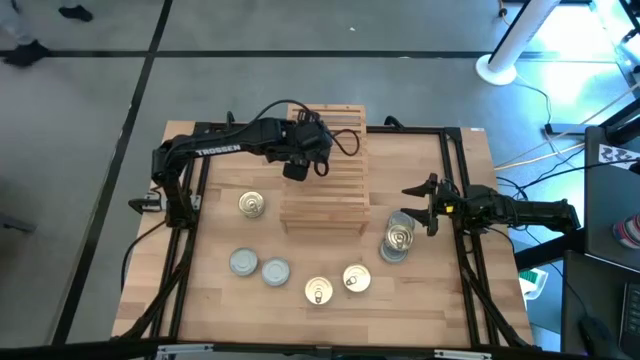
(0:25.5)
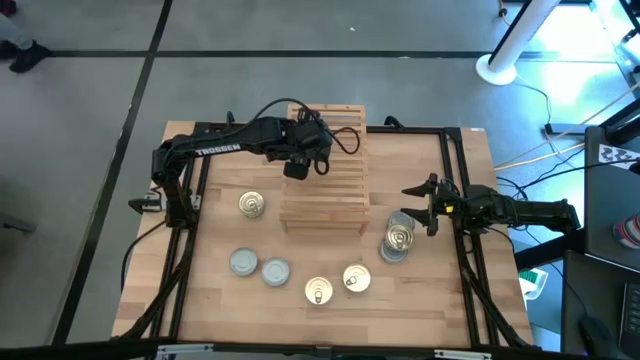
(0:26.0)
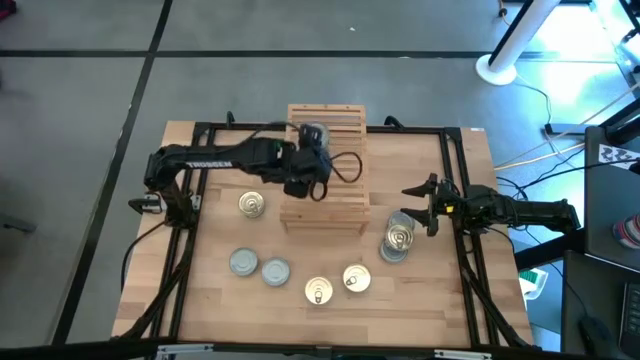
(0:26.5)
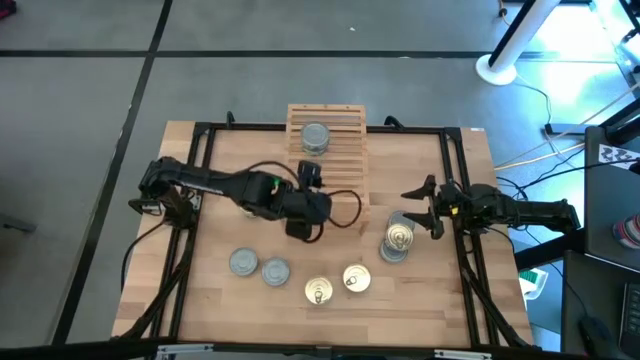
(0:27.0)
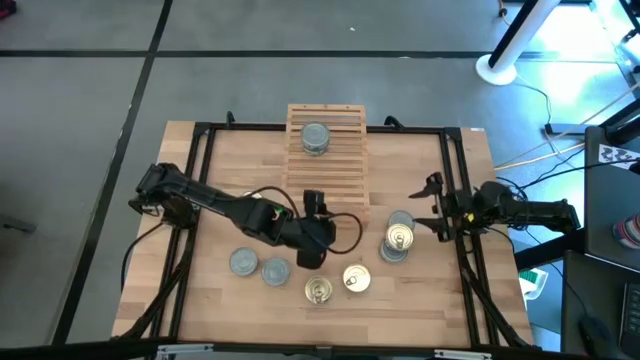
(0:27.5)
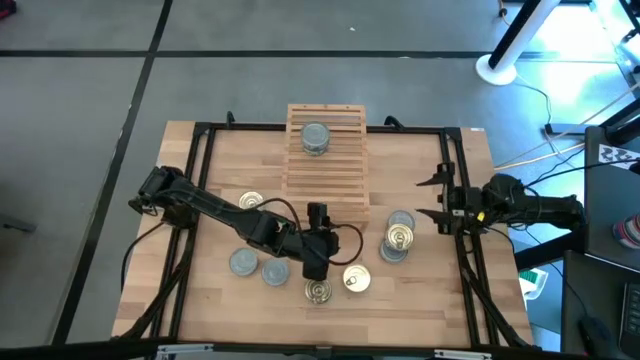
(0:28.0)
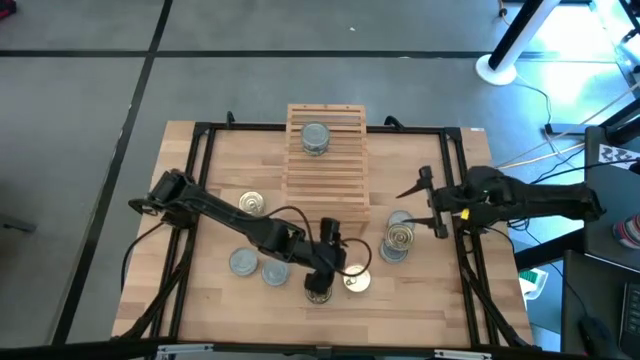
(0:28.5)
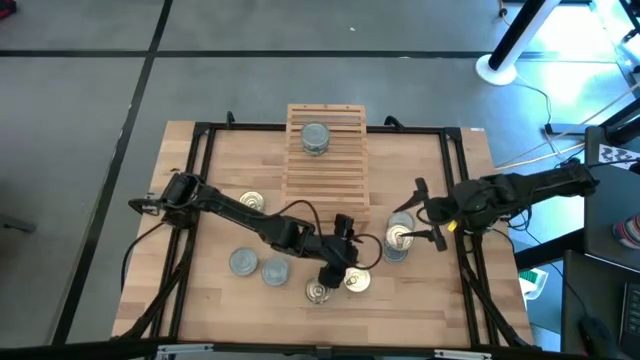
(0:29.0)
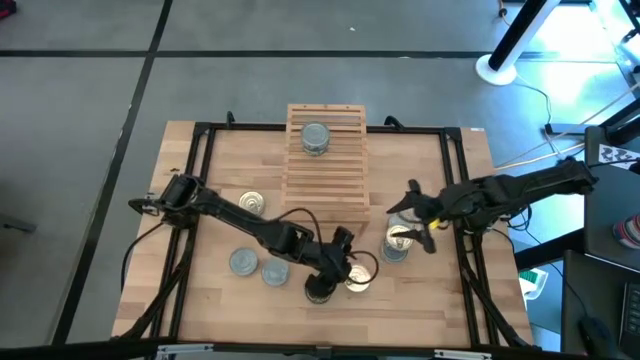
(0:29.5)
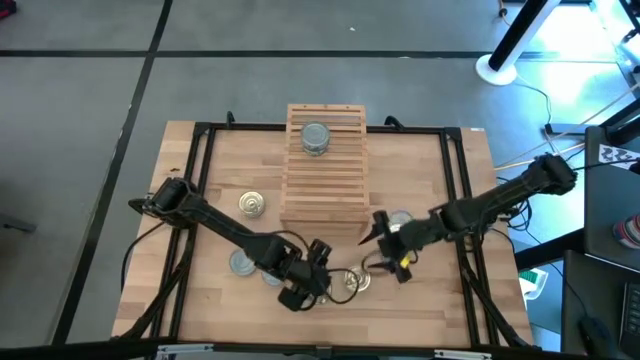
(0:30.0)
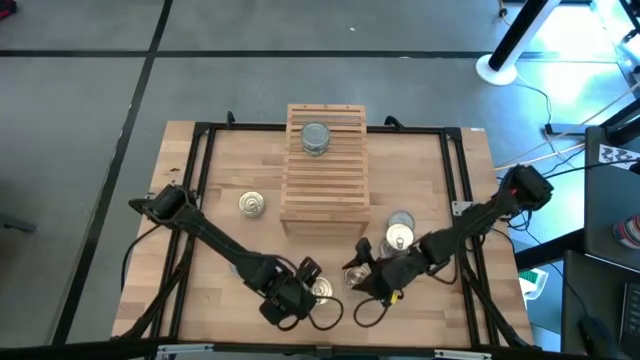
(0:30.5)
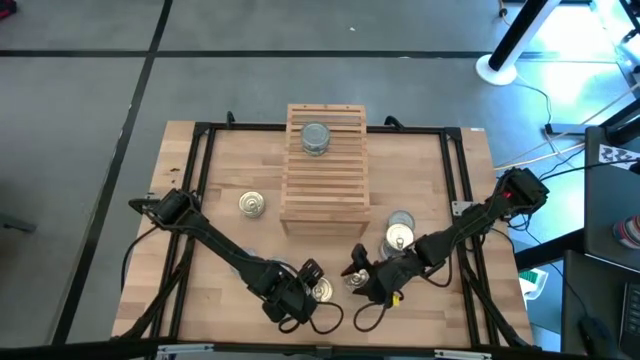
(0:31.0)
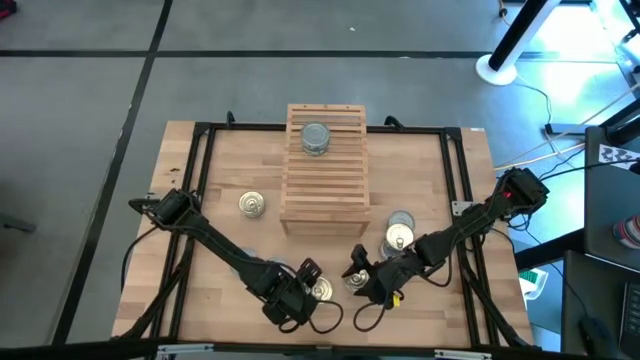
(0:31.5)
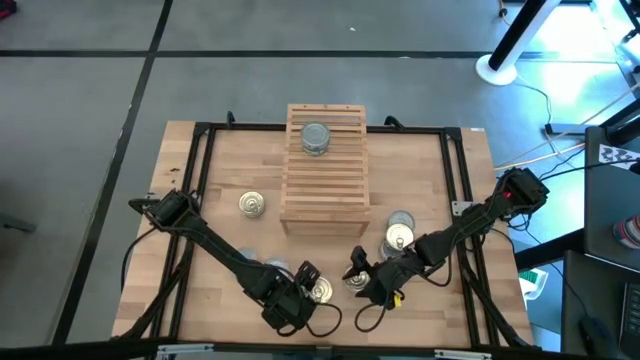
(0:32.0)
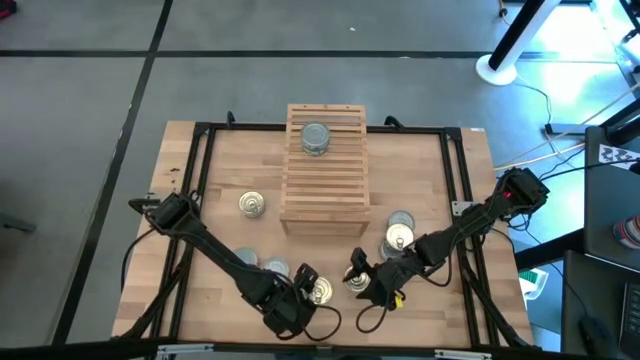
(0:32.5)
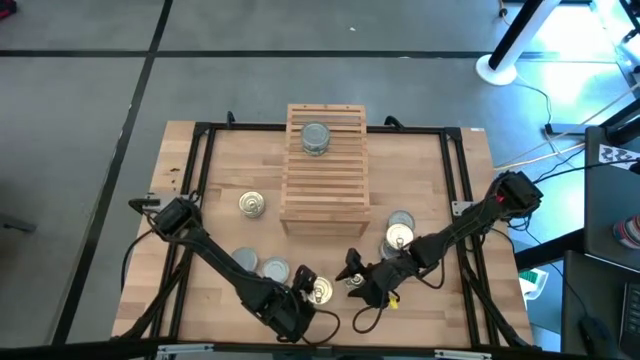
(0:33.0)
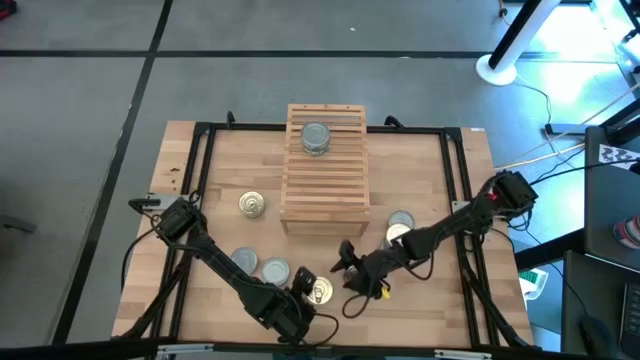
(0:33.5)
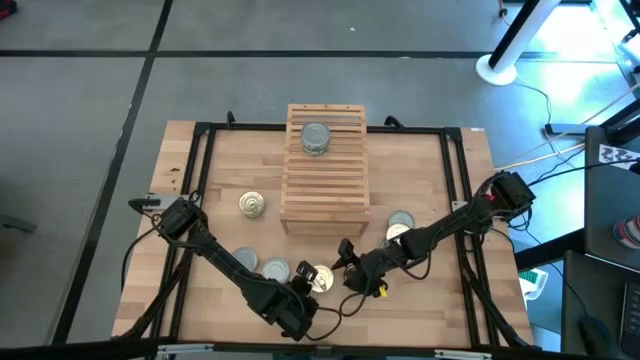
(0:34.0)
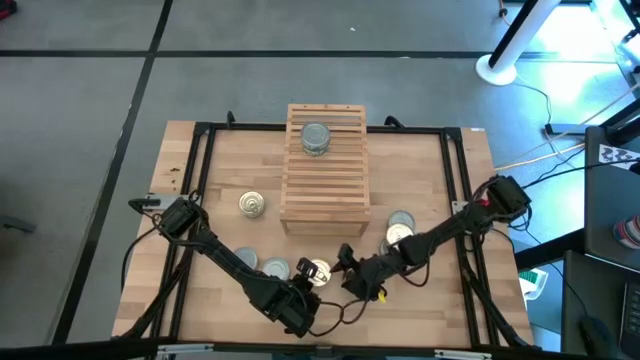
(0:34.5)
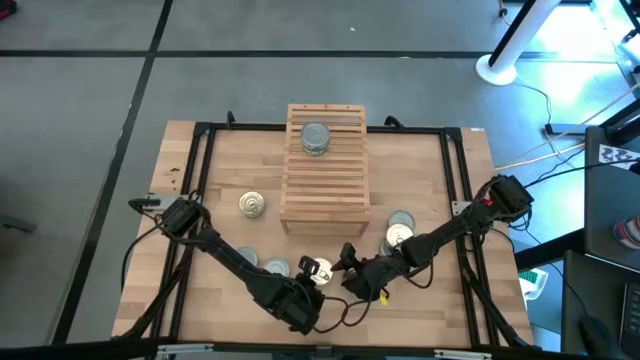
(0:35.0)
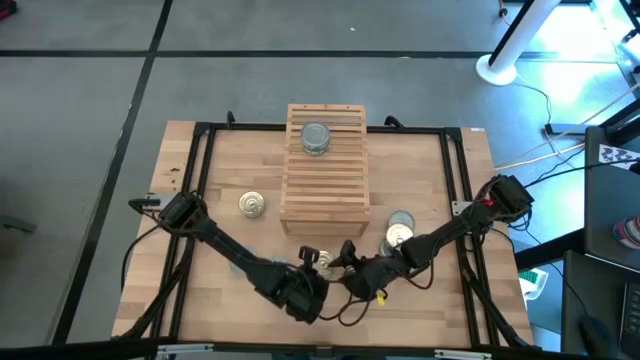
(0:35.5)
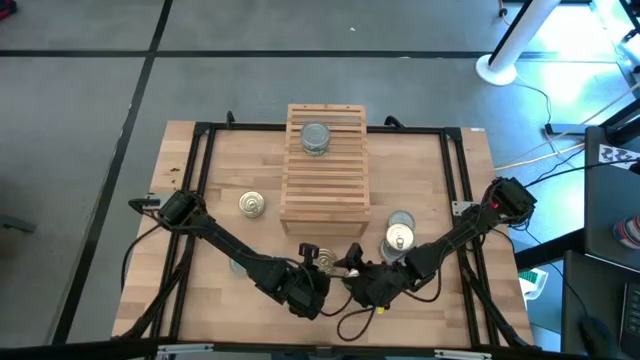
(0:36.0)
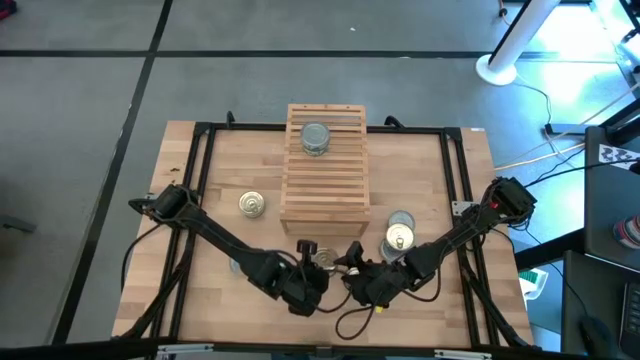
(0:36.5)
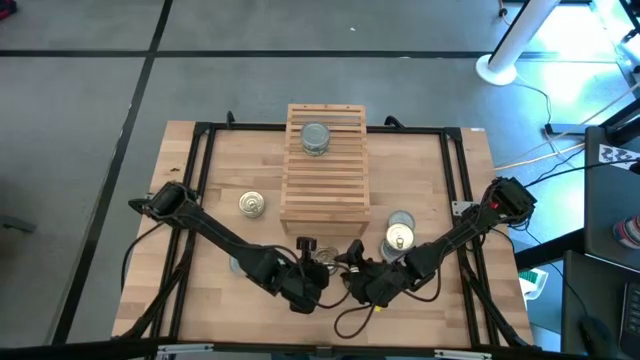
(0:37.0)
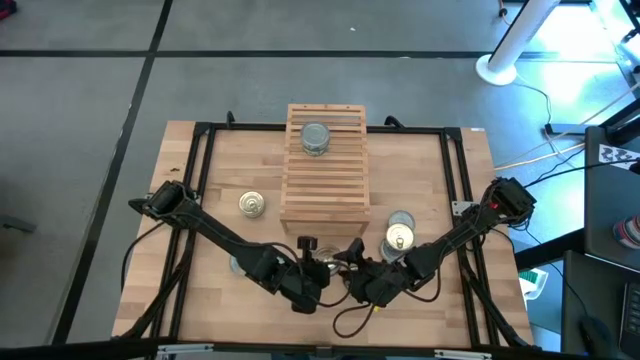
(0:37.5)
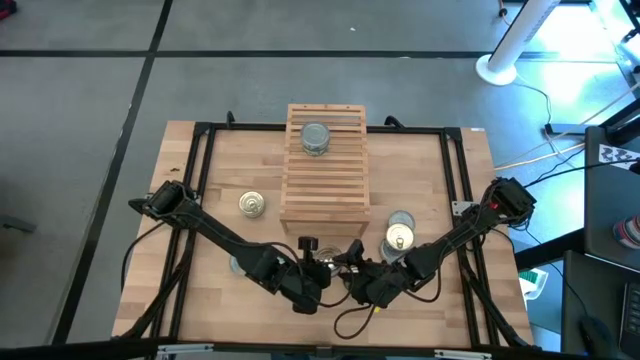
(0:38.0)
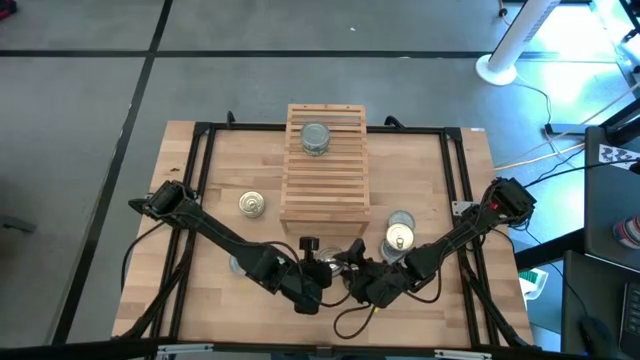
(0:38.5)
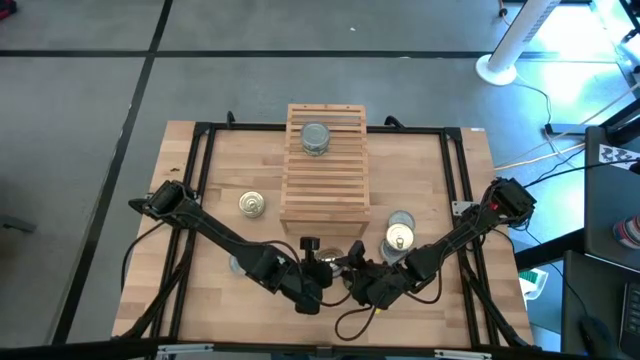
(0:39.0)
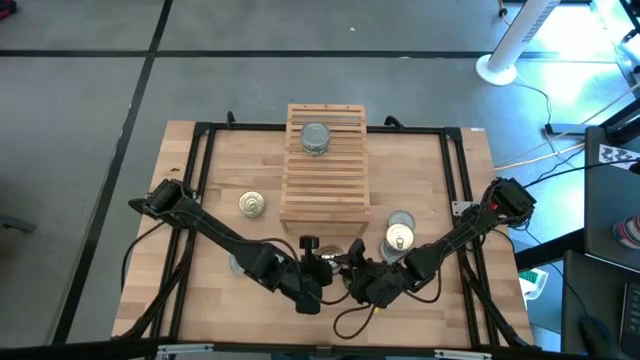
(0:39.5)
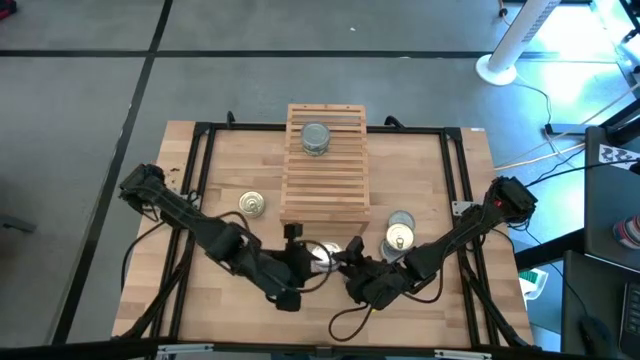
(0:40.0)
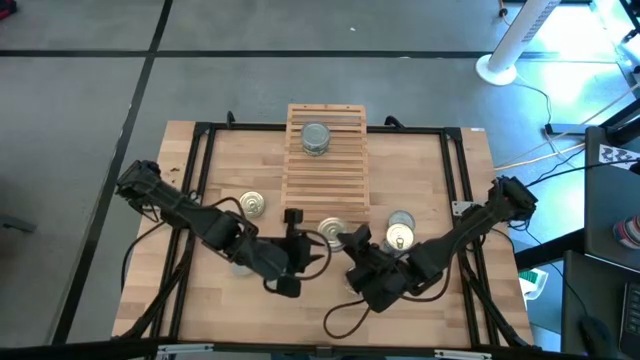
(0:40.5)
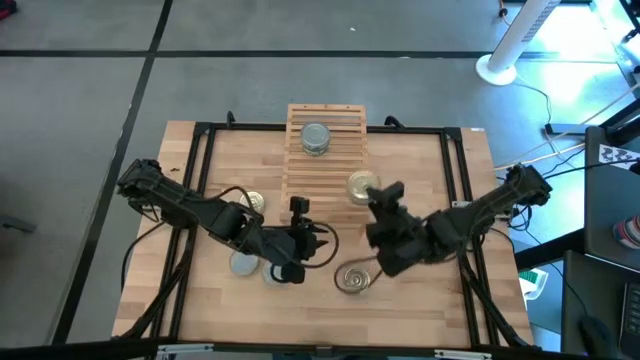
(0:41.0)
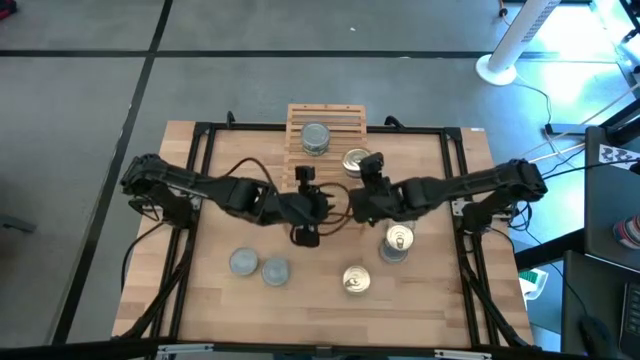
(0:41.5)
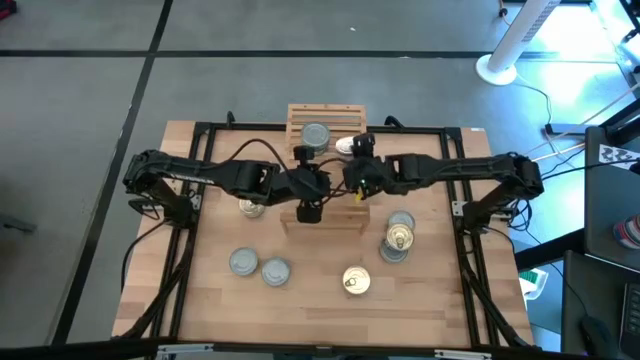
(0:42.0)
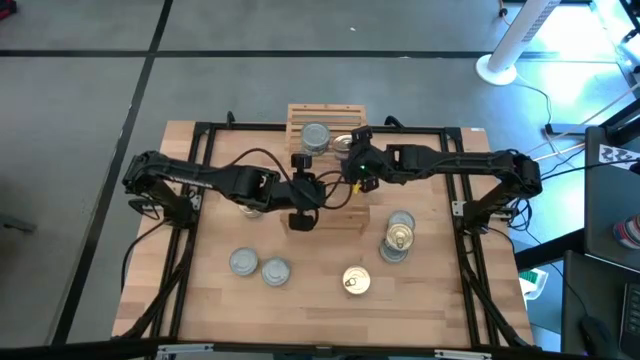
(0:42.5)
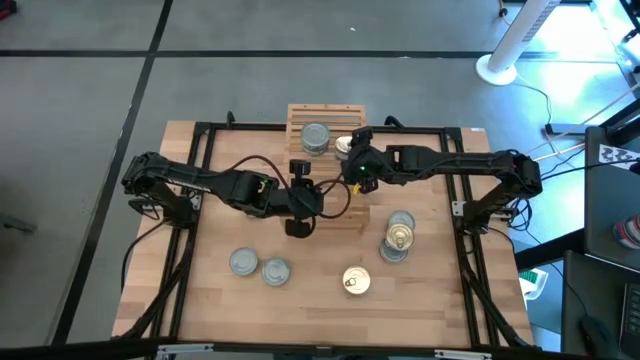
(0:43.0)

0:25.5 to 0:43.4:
Task: Stack canned seafood by type on shelf
Put the blue tuna can on the shelf

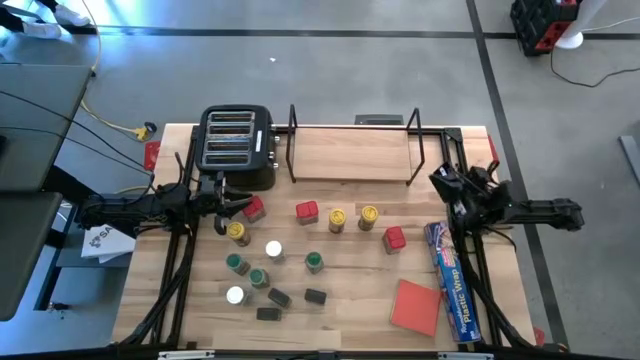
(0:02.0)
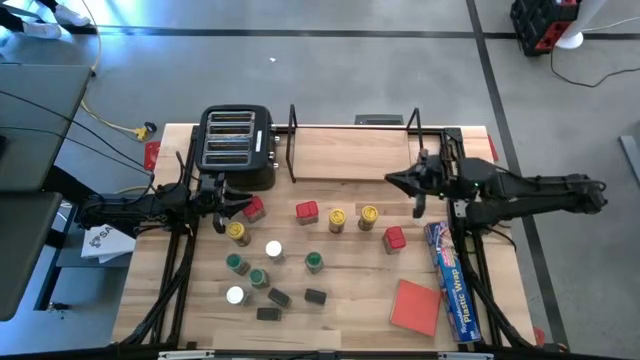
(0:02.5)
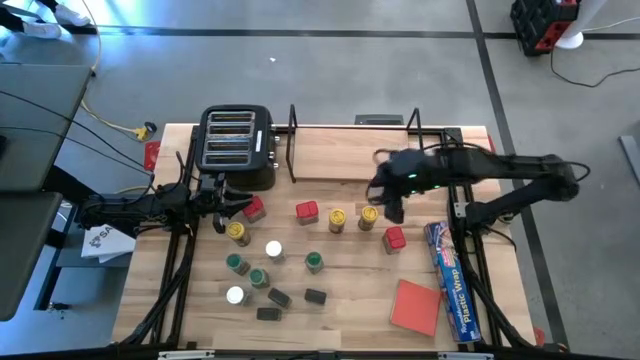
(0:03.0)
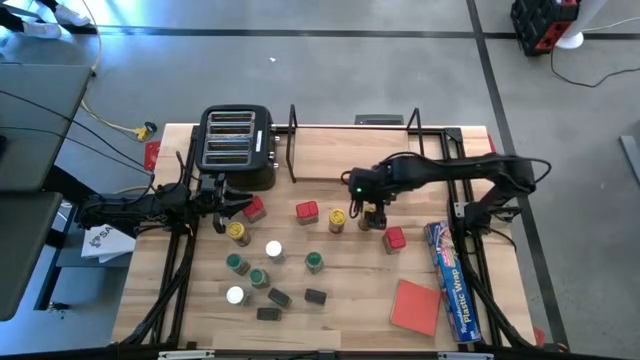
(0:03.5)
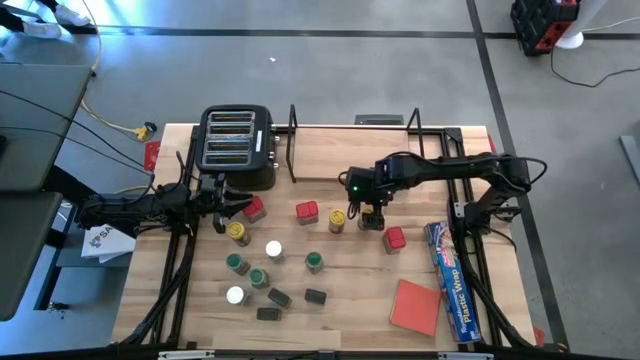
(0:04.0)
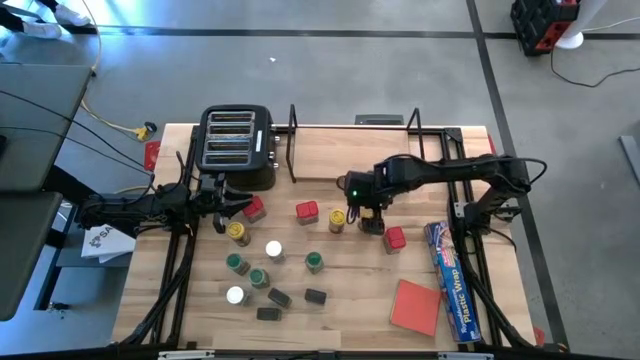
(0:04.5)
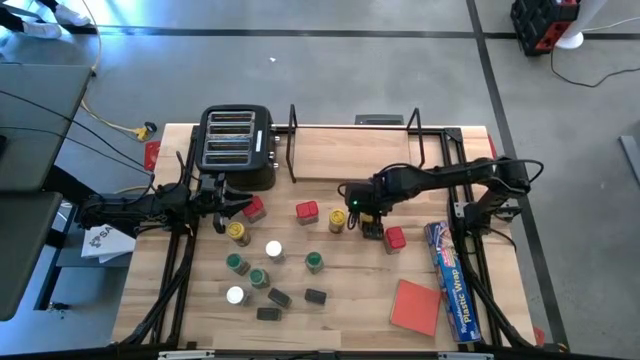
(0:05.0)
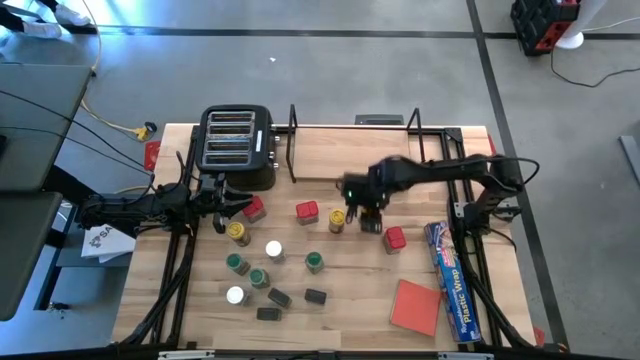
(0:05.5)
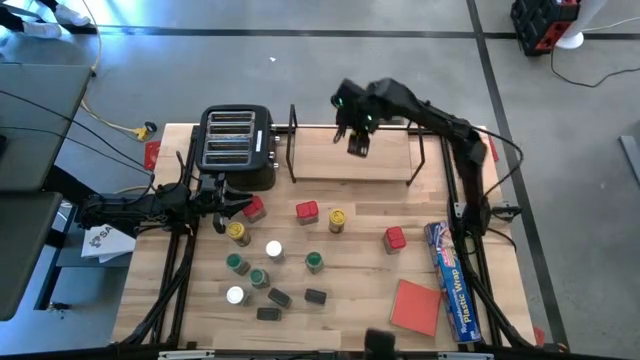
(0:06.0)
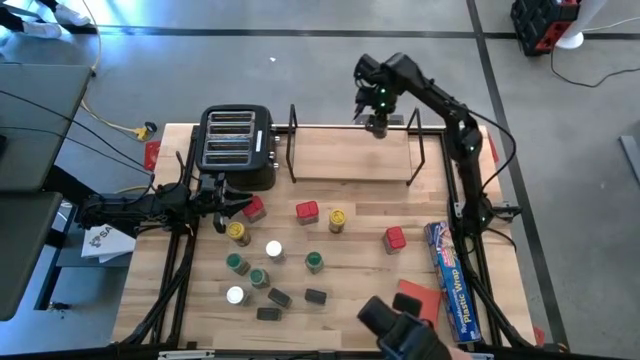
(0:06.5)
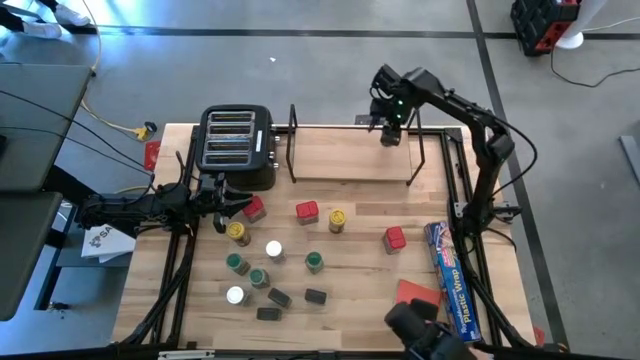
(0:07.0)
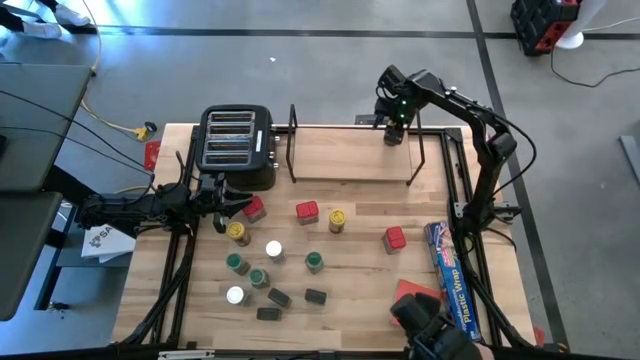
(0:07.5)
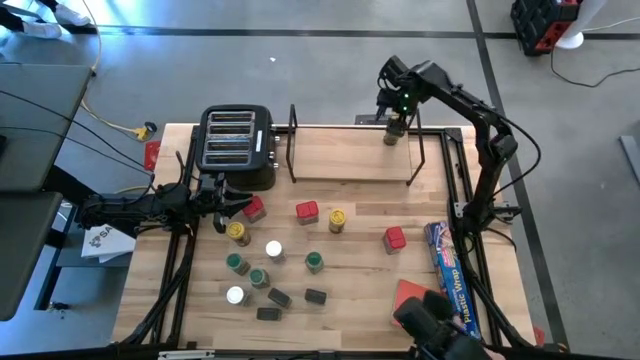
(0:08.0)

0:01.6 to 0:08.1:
Task: Shelf spices
Put the top right yellow seasoning bottle on the shelf
